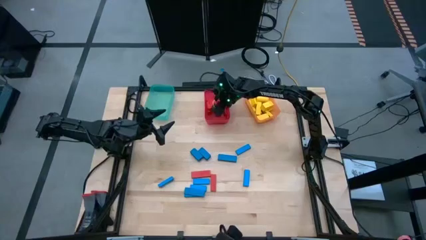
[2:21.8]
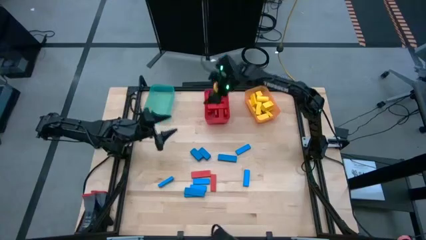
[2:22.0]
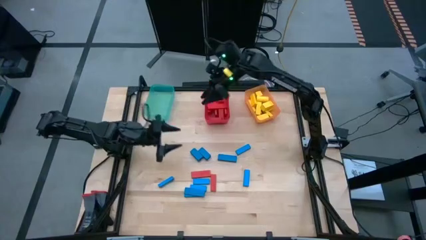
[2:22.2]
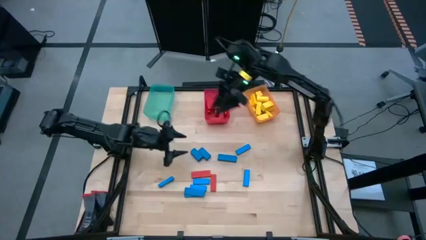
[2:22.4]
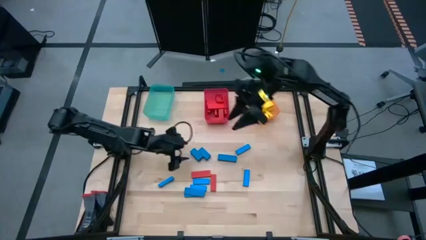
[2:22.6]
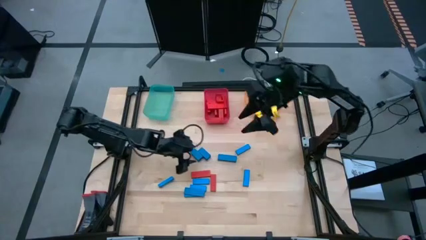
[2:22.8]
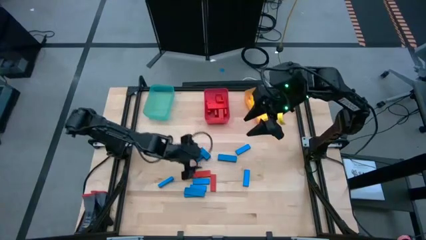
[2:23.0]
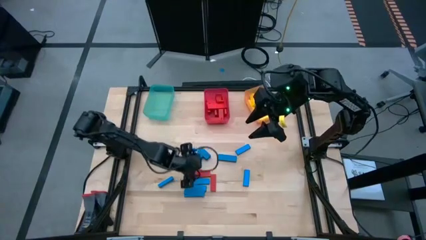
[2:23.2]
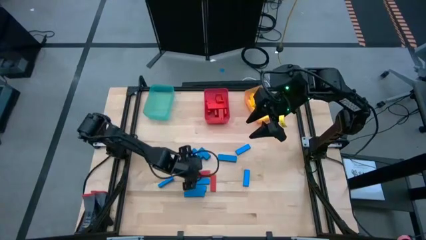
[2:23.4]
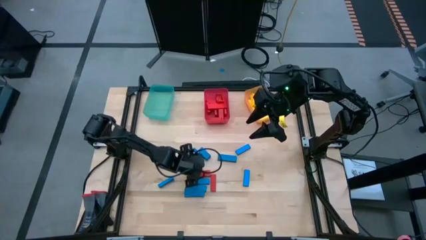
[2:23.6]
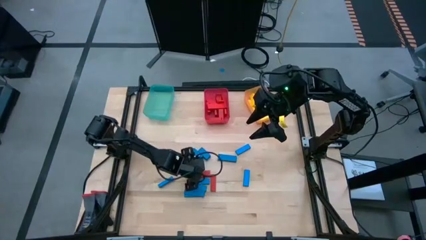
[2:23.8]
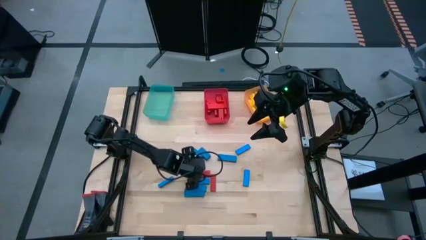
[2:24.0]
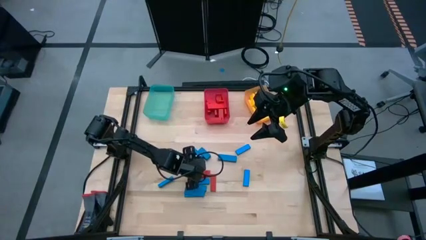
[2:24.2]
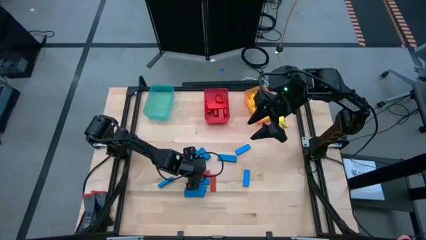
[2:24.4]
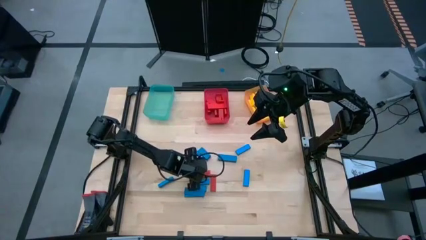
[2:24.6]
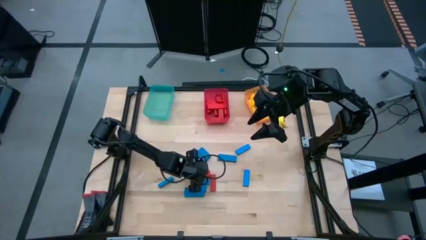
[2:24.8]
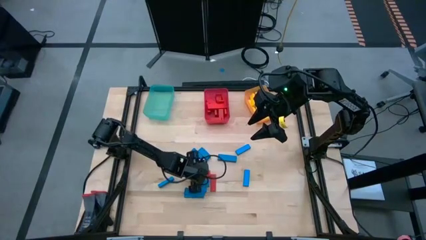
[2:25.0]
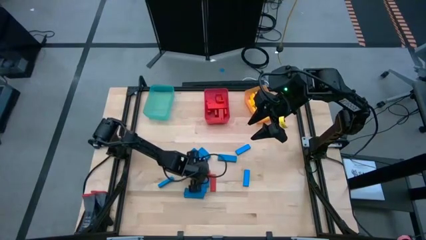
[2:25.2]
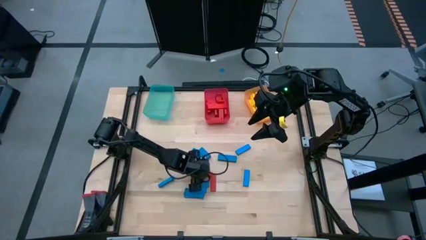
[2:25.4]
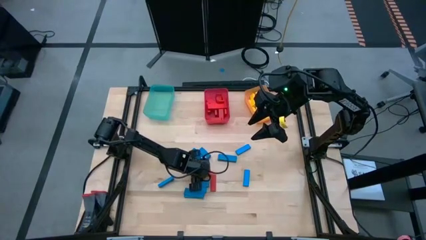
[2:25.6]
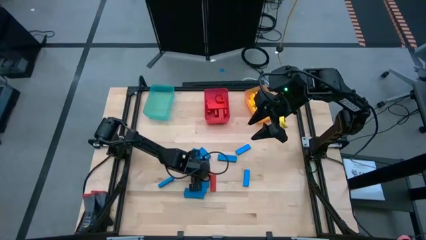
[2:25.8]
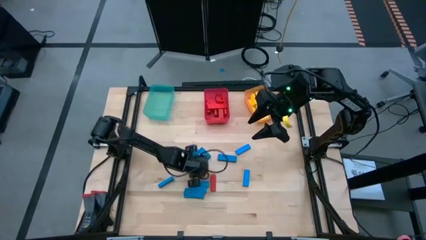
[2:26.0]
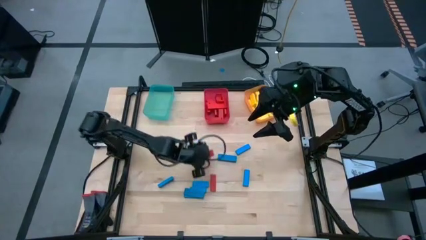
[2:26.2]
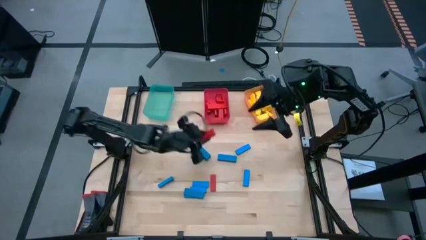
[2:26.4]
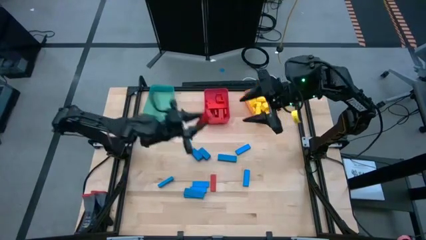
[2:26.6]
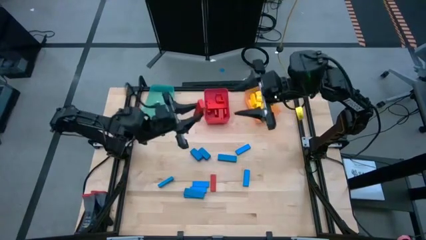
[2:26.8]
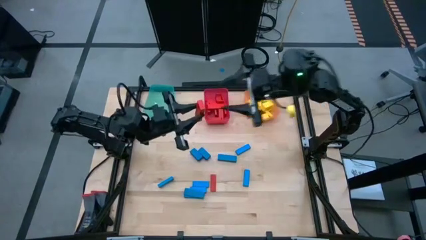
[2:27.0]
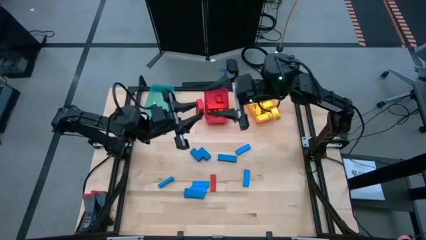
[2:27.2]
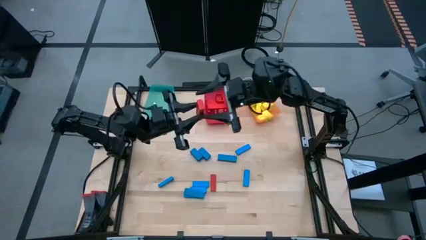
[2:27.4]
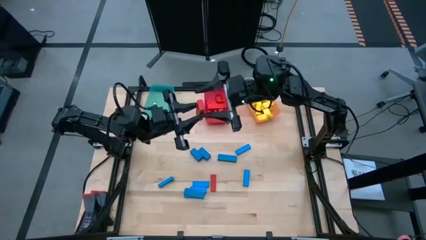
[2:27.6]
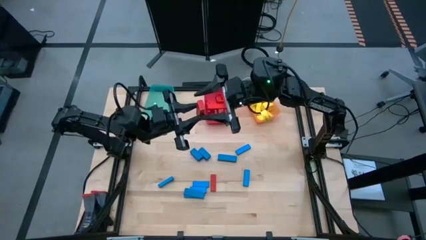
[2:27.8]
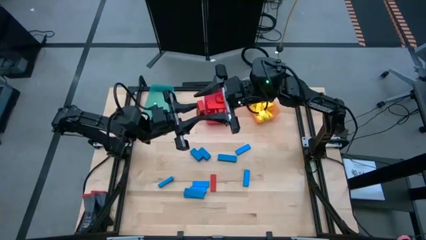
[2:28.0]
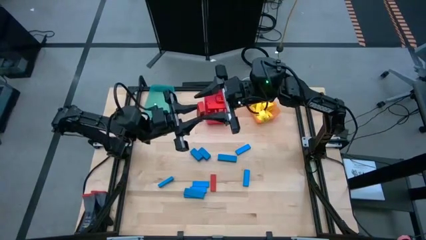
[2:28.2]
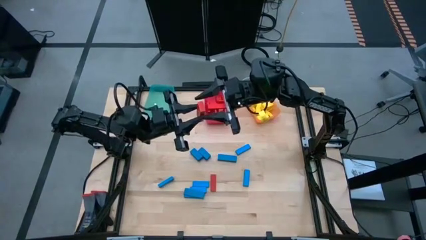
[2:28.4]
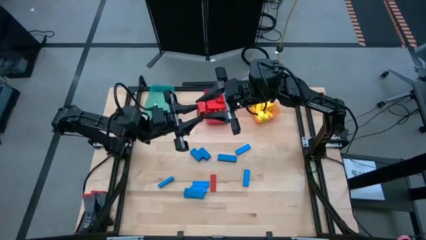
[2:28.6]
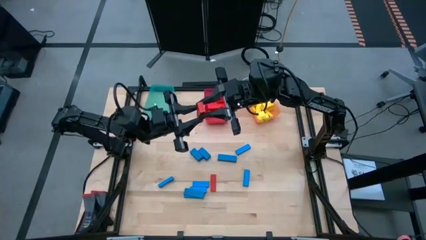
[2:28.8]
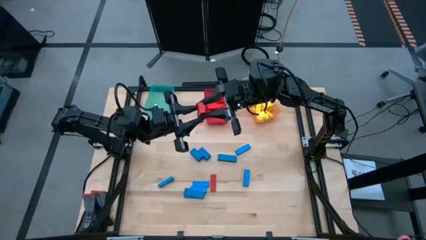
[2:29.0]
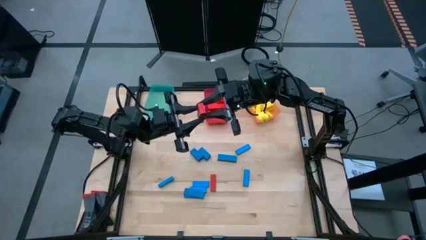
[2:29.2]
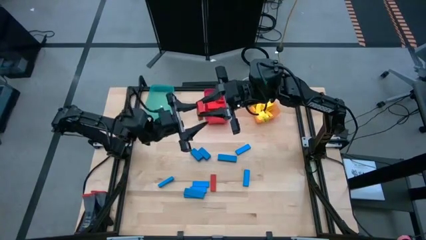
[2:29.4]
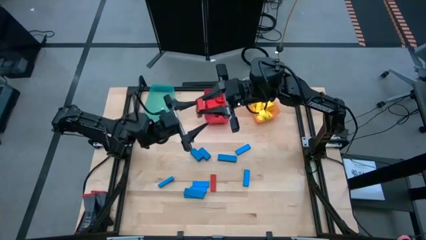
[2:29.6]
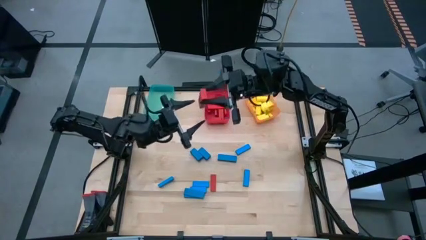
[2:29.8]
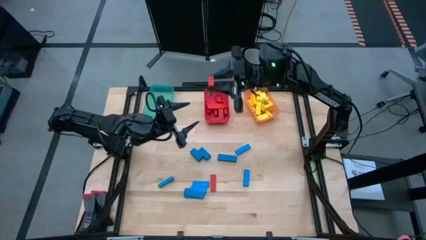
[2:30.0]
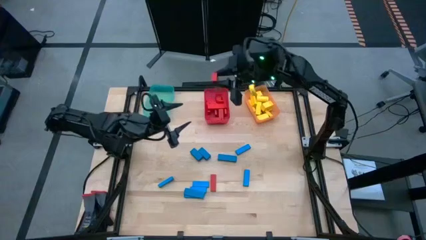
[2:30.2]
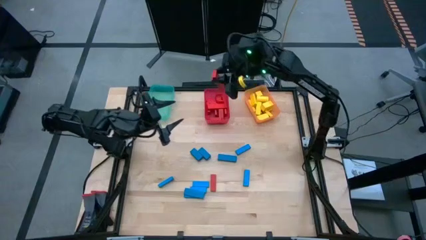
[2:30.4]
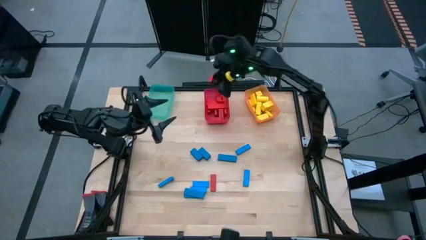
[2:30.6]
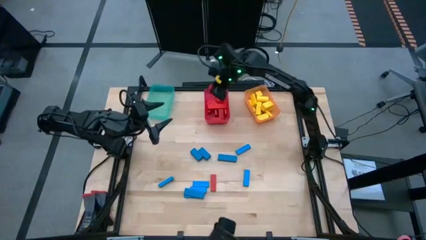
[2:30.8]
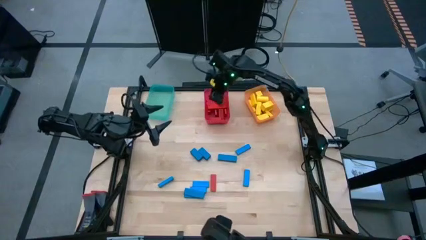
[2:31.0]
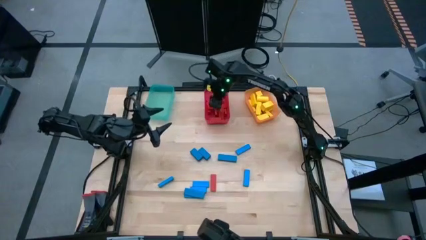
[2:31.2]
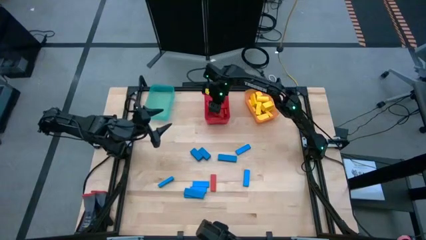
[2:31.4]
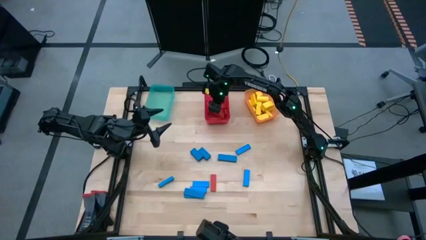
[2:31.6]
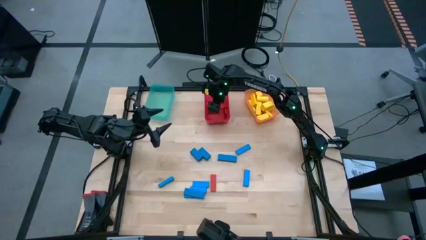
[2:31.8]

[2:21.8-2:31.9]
Task: Sort blocks
Put the red block into the red bin

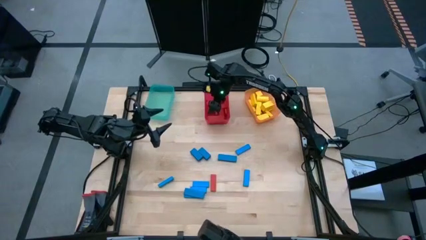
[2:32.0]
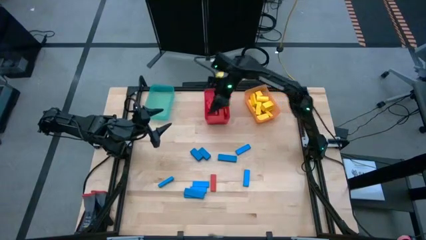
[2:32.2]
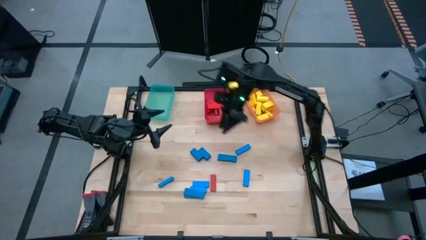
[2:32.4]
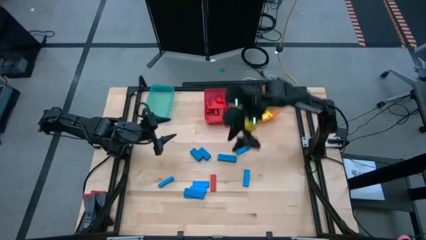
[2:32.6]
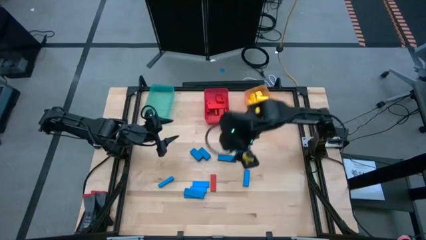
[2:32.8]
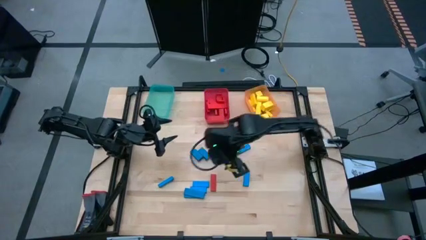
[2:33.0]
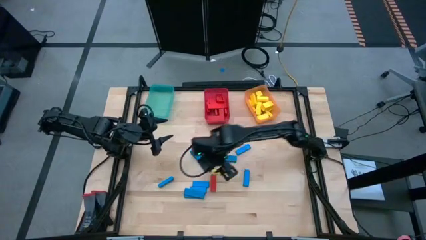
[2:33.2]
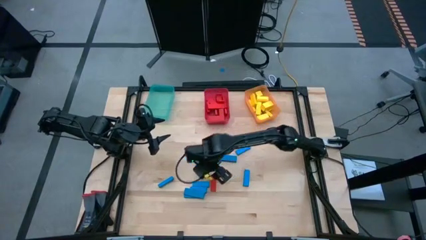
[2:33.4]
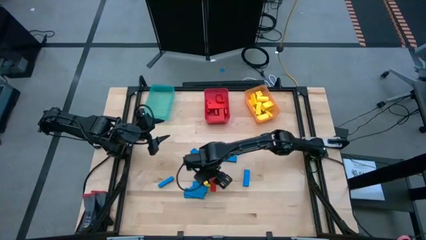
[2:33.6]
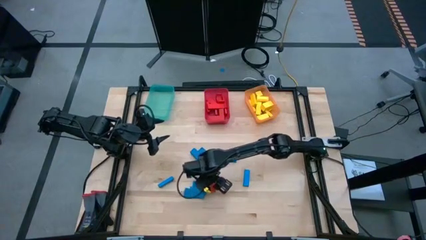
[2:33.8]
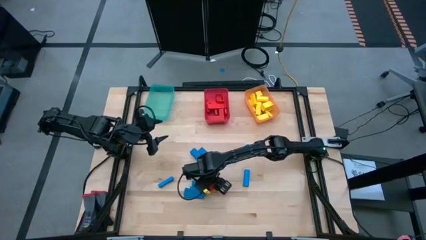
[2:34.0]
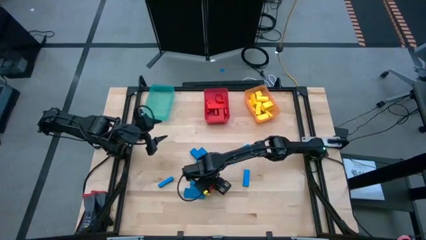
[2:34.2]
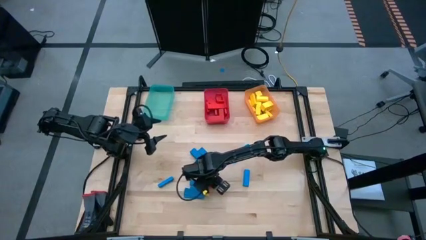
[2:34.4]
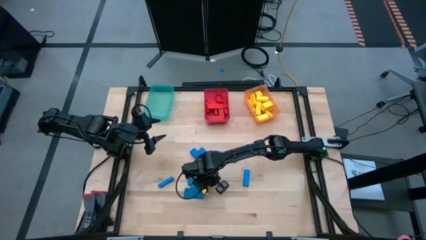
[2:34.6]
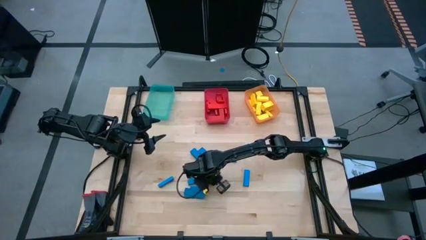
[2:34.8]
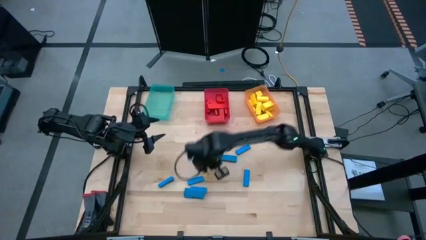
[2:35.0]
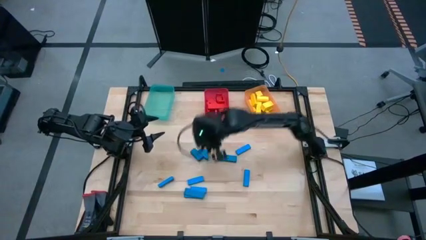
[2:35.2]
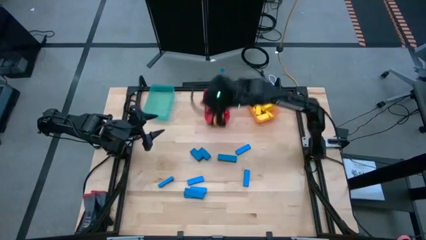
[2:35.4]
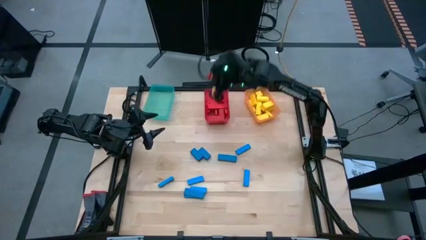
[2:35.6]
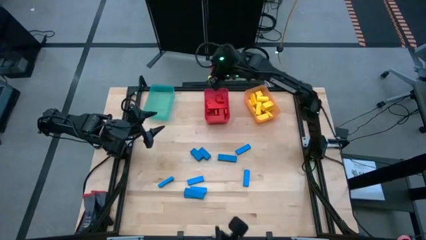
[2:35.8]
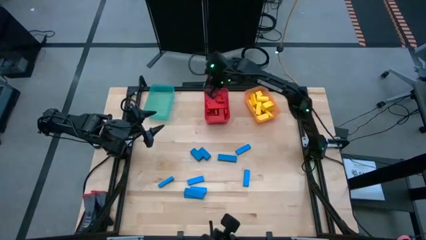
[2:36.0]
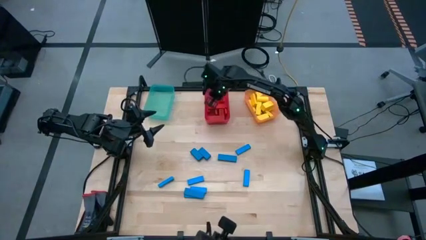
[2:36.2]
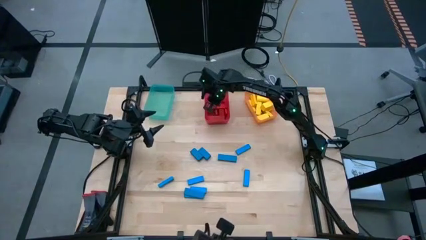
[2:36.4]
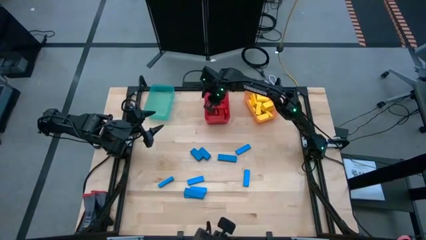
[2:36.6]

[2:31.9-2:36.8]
Put the red block into the red bin
